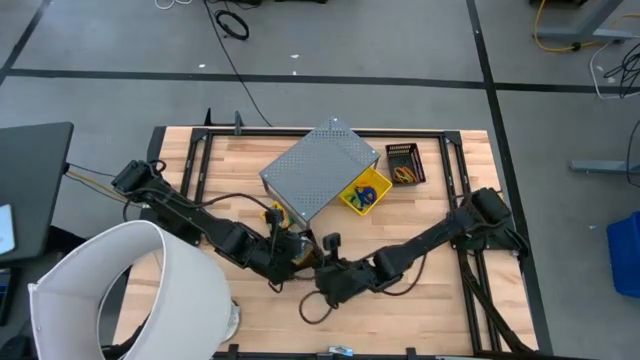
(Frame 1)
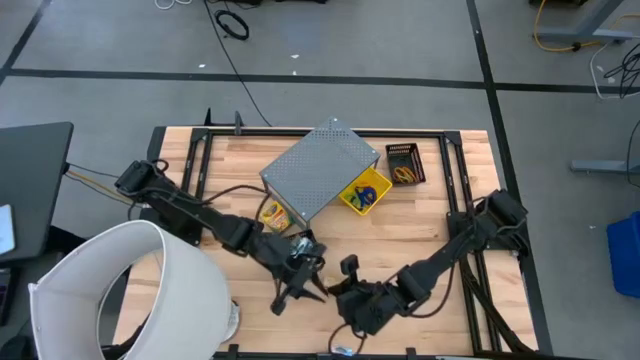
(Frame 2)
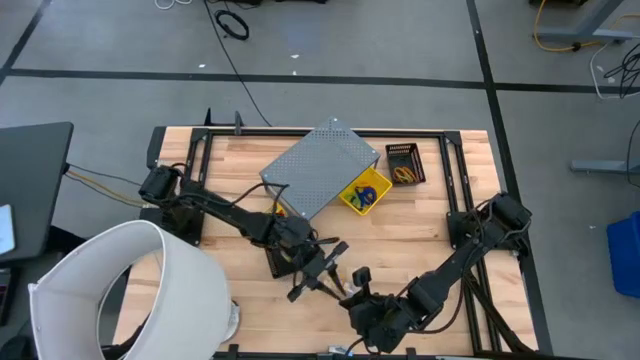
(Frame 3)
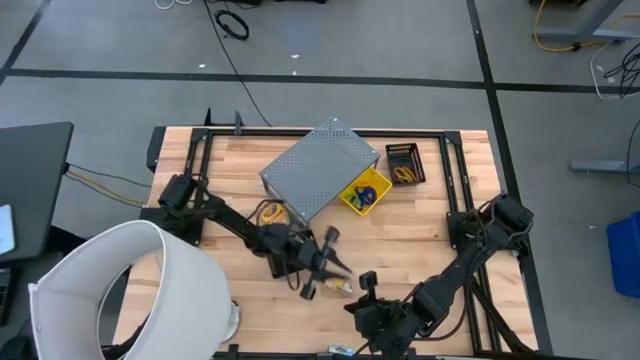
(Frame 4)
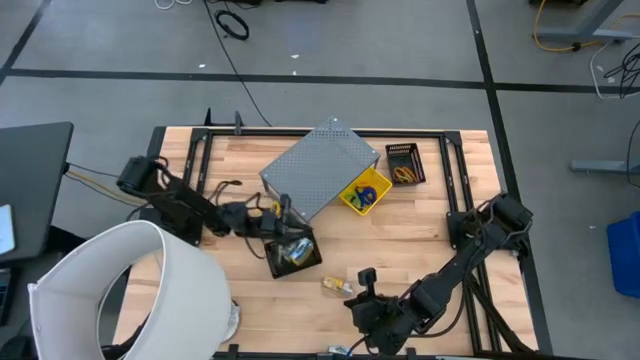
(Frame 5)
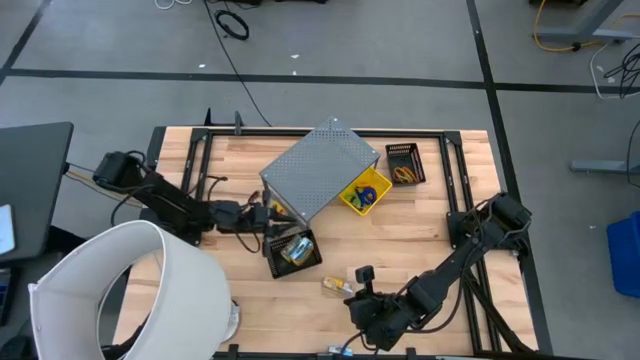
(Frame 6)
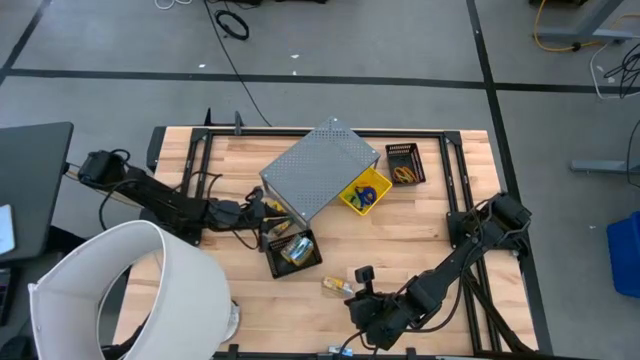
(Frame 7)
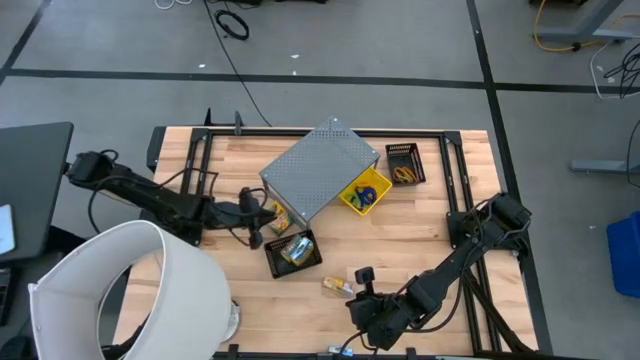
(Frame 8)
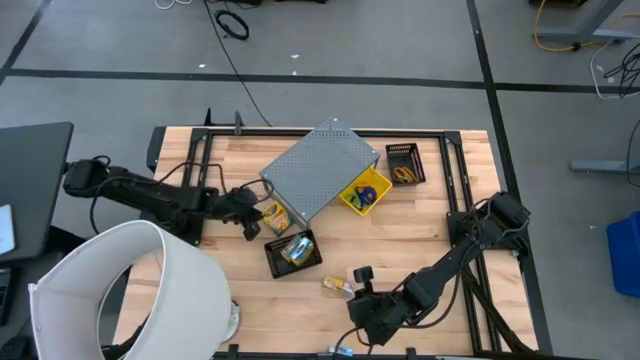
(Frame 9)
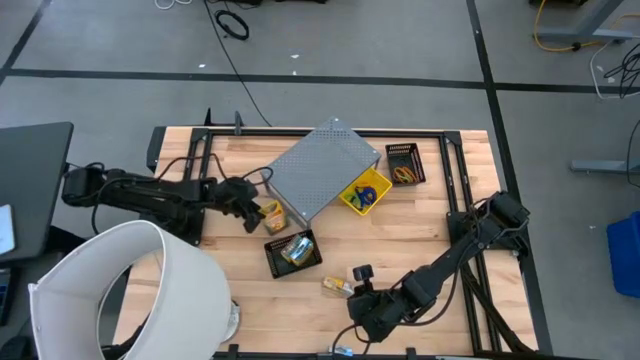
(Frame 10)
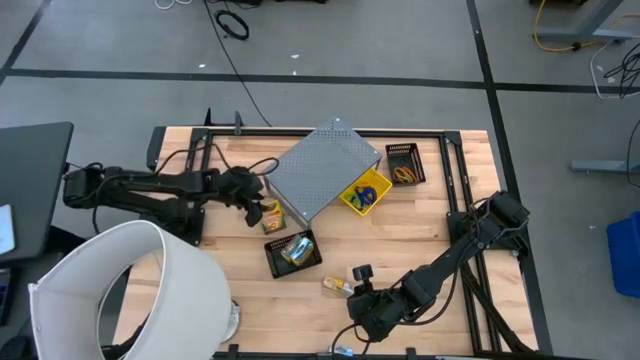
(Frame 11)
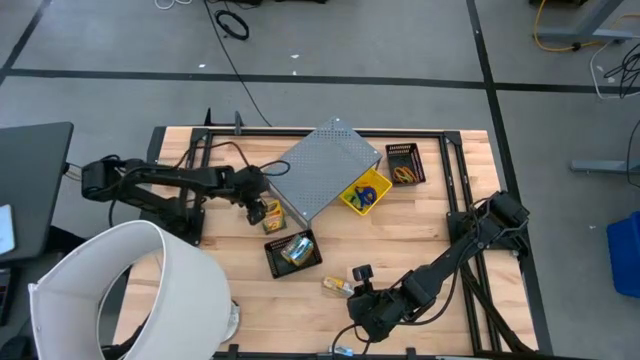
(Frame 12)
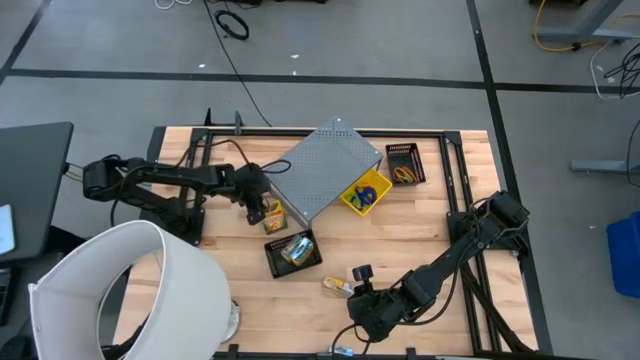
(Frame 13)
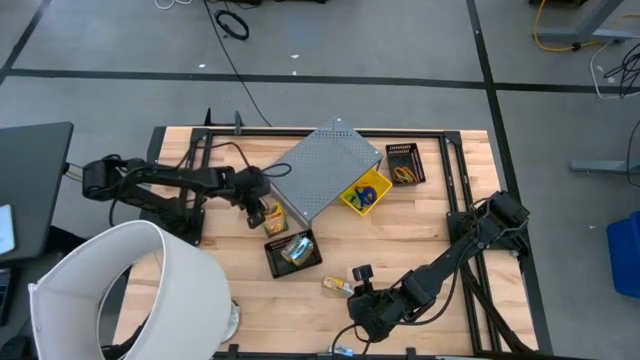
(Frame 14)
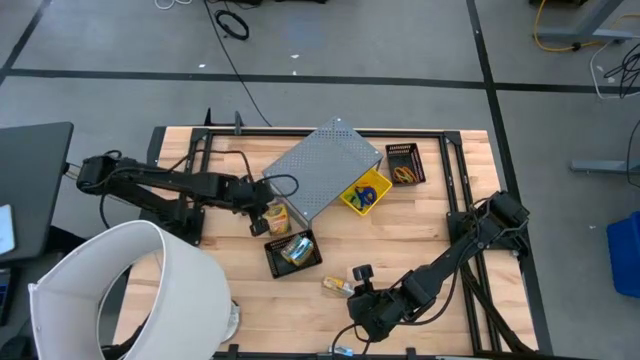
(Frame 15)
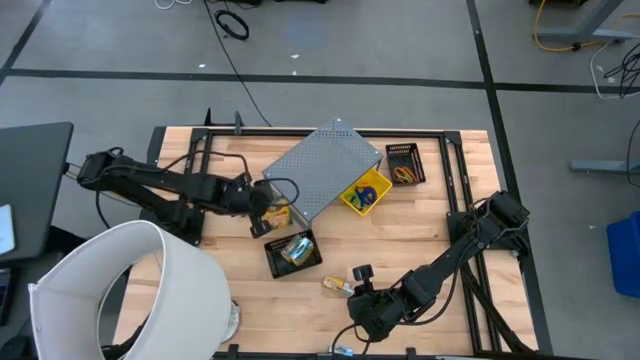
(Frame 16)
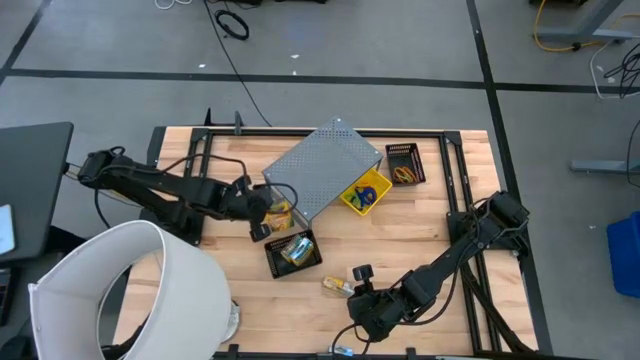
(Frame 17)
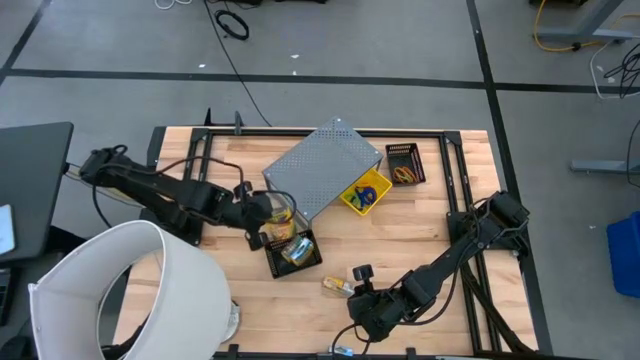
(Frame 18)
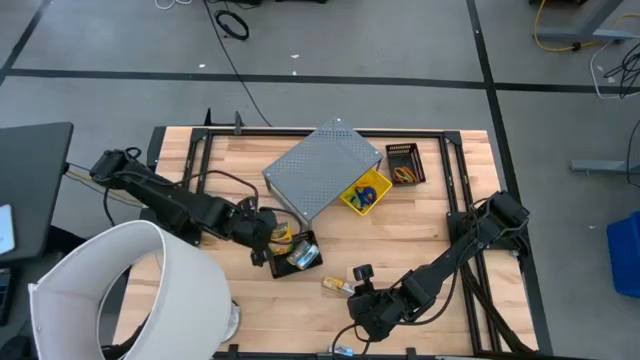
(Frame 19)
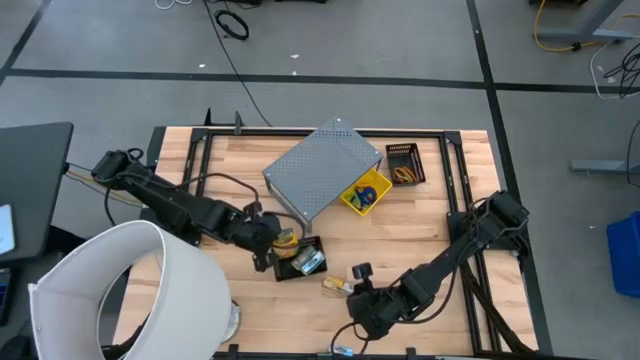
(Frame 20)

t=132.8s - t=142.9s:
Task: Pick & Place Office Desk Supplies
Put the crayon box into the bottom black bin

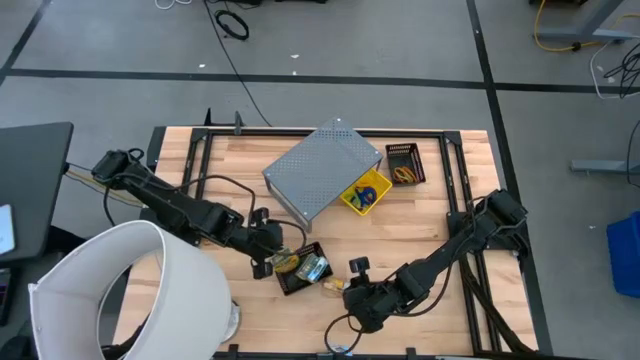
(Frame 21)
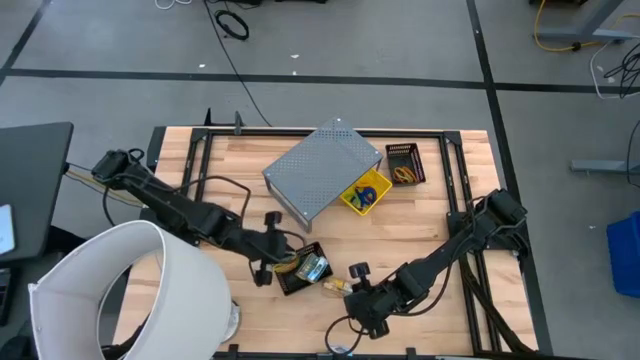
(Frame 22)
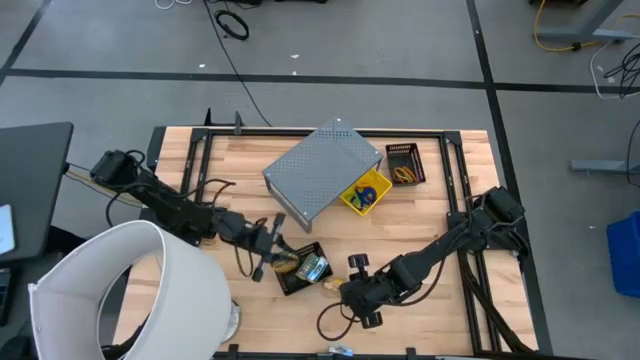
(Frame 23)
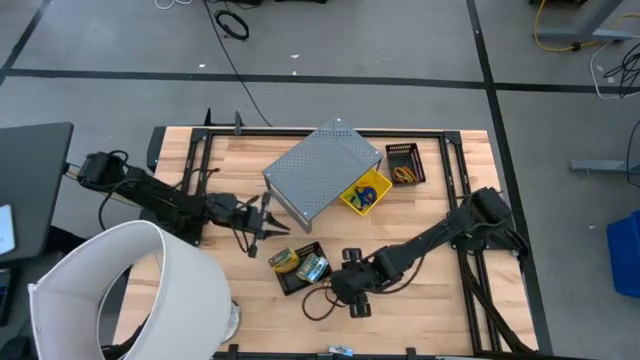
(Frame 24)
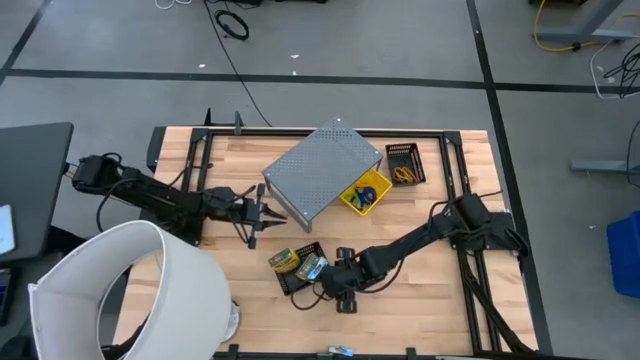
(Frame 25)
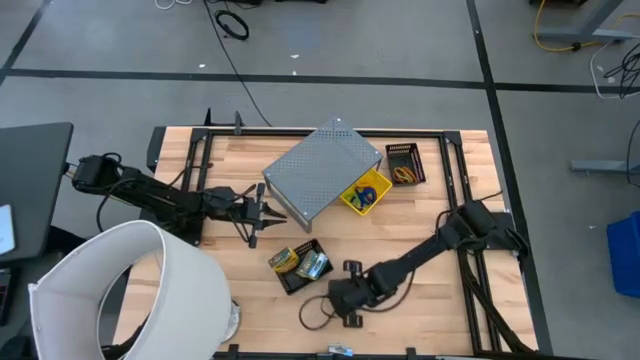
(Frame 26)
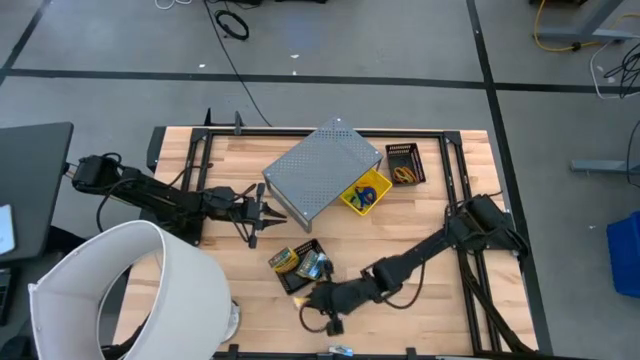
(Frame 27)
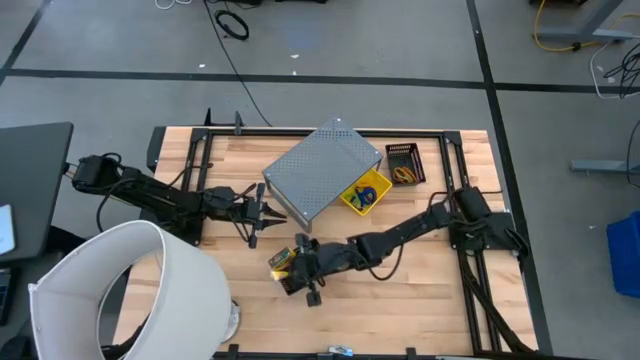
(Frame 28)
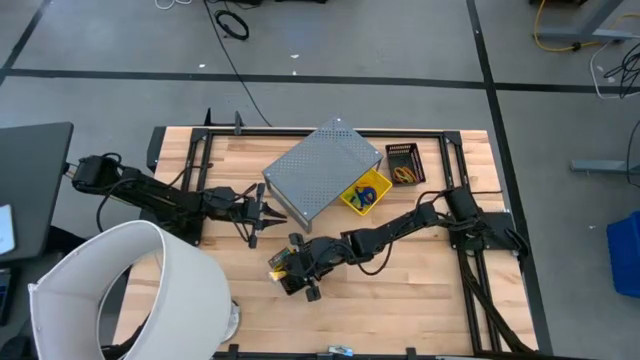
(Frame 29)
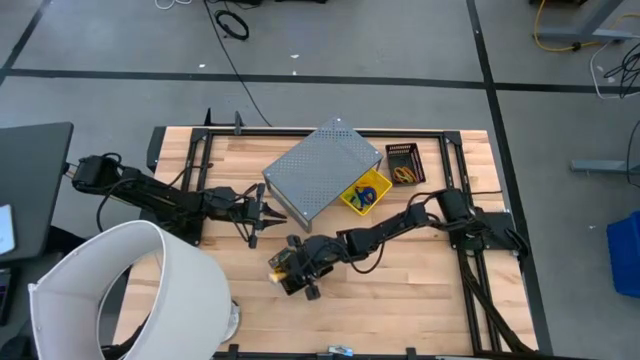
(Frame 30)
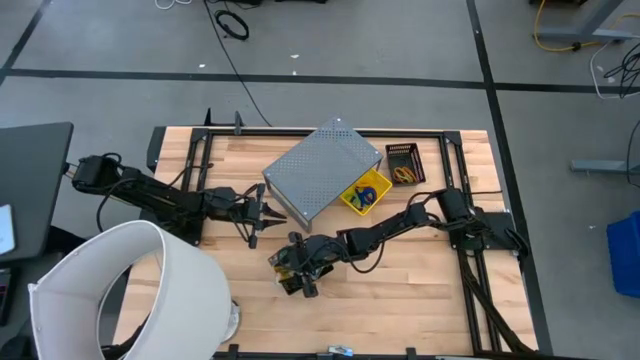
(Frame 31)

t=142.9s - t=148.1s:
Put the crayon box into the bottom black bin

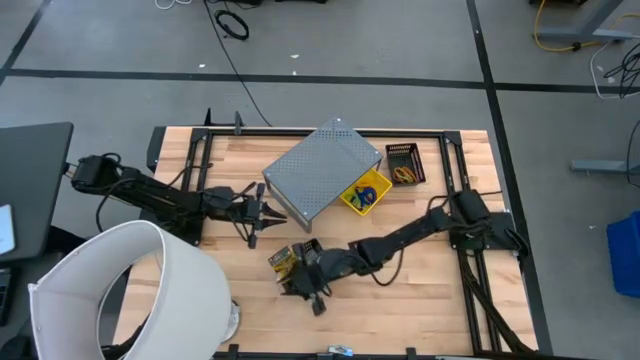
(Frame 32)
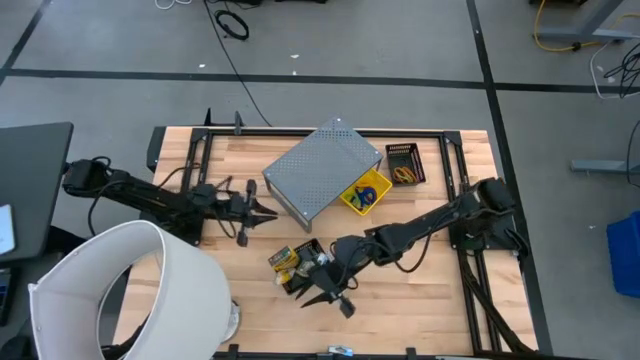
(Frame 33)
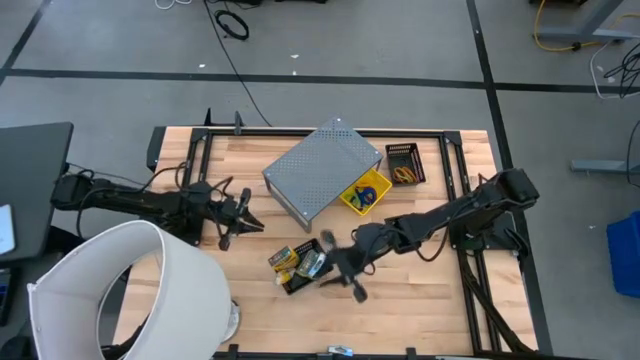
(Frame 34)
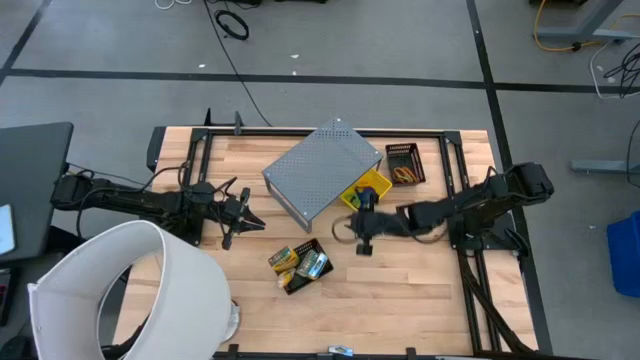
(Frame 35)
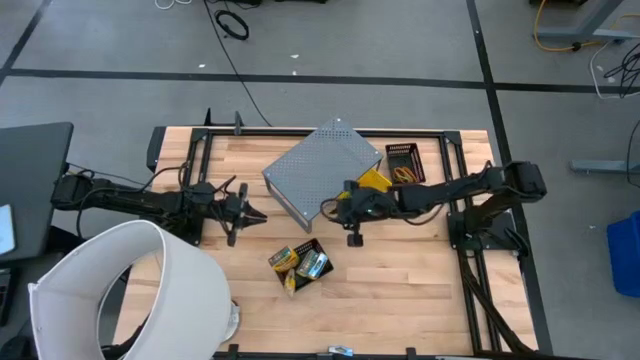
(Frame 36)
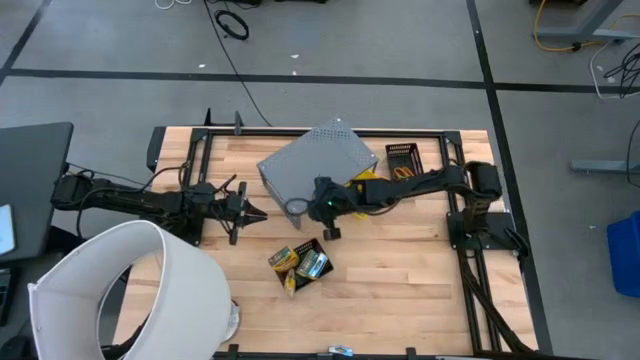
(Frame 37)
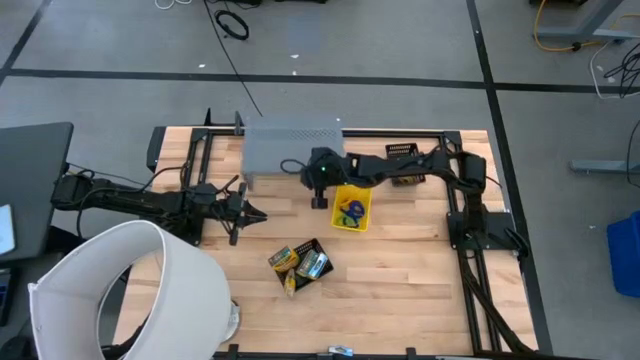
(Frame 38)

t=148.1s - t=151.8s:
Move the shelf to the middle top of the table

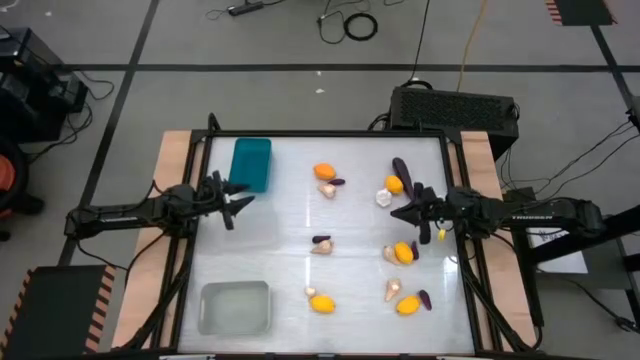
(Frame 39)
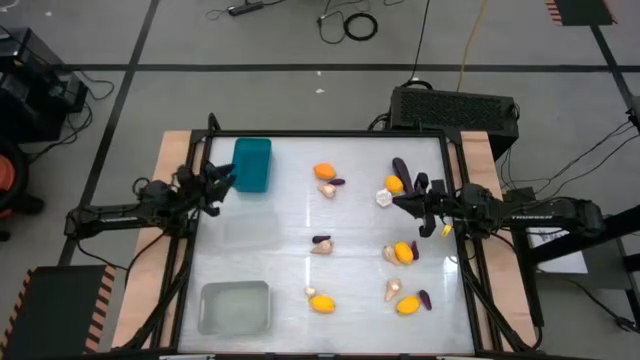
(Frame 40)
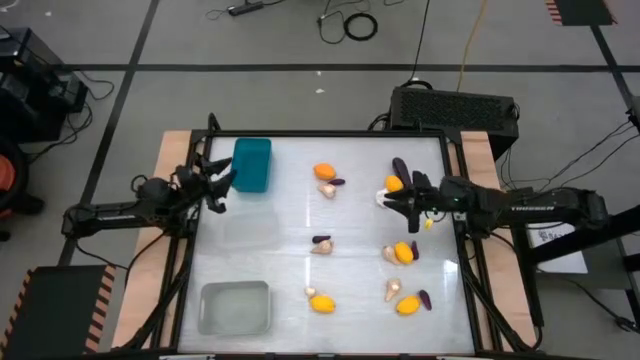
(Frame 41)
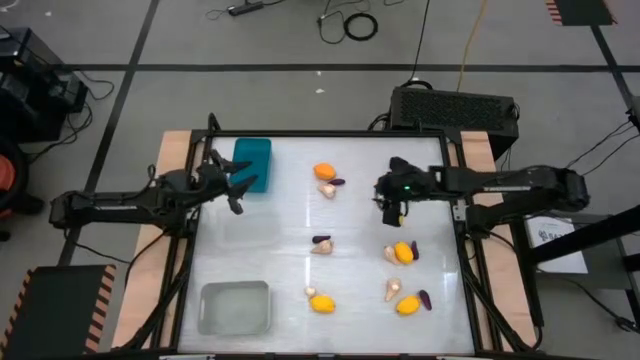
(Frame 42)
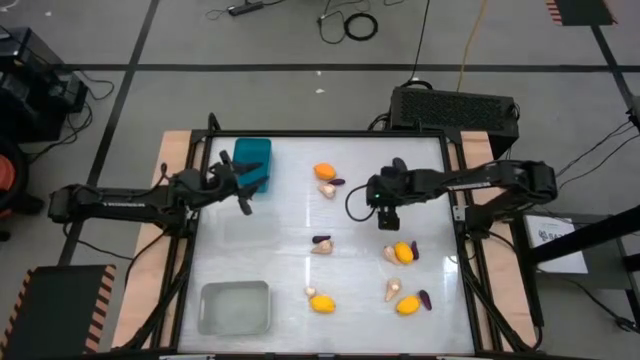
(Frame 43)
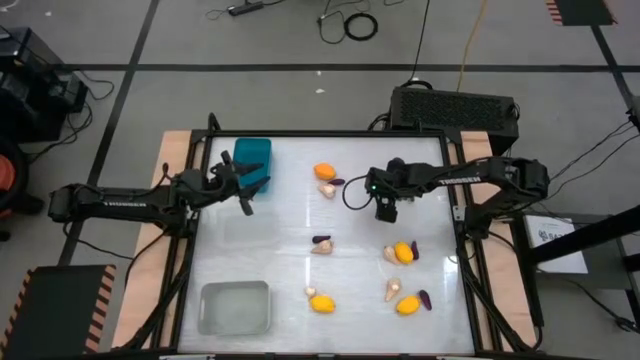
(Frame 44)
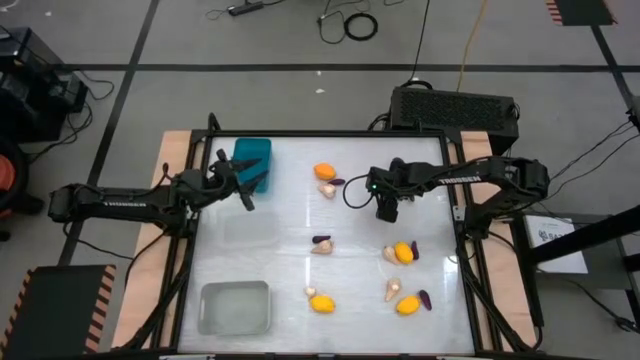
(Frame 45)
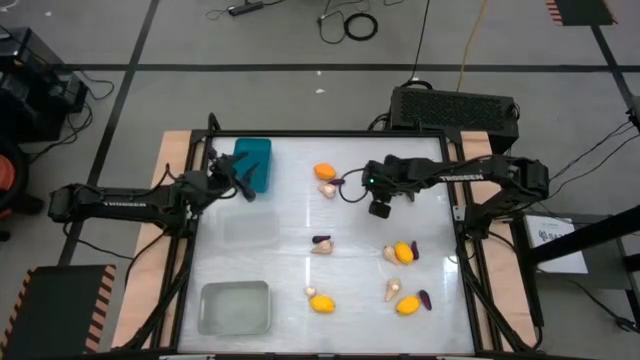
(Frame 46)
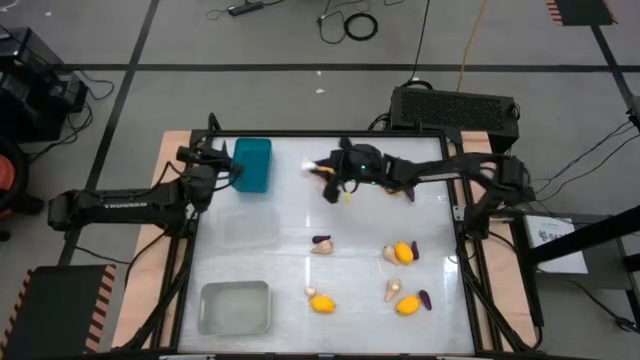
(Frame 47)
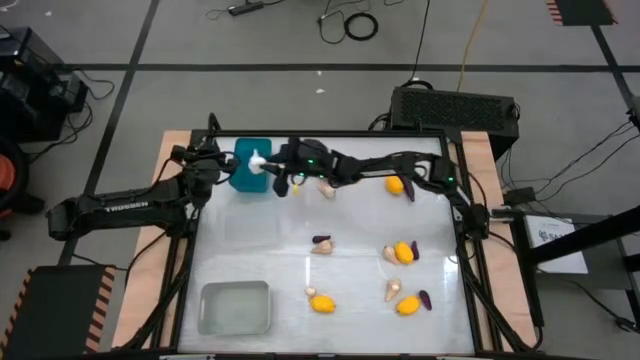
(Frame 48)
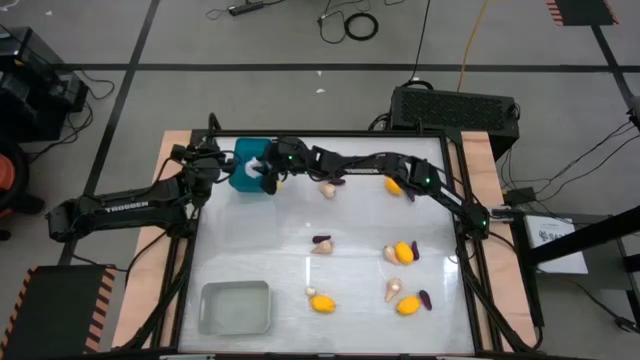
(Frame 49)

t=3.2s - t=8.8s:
Task: Sort produce into baskets
Put the garlic into the blue bin
